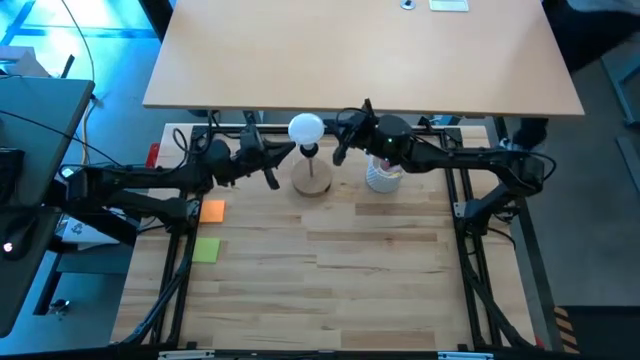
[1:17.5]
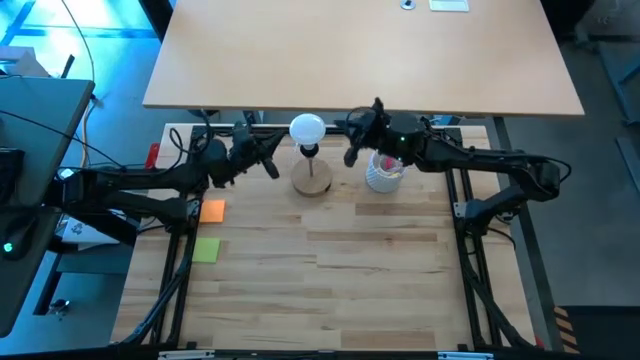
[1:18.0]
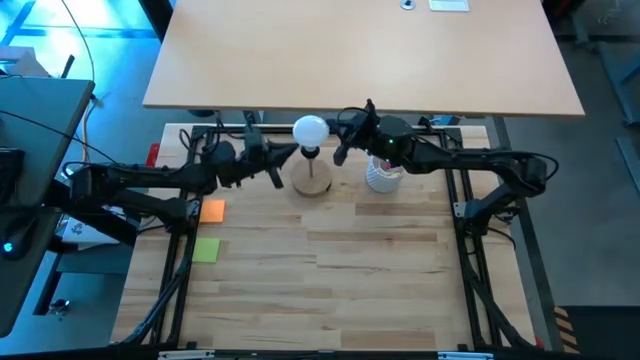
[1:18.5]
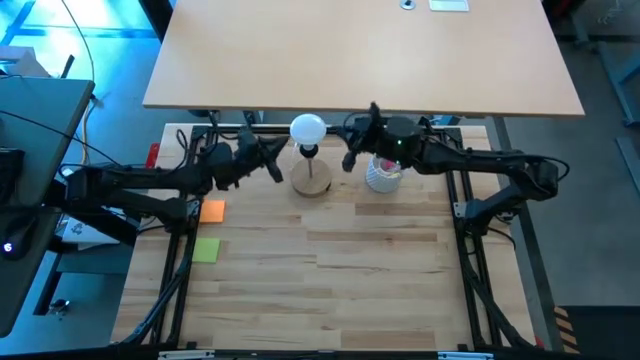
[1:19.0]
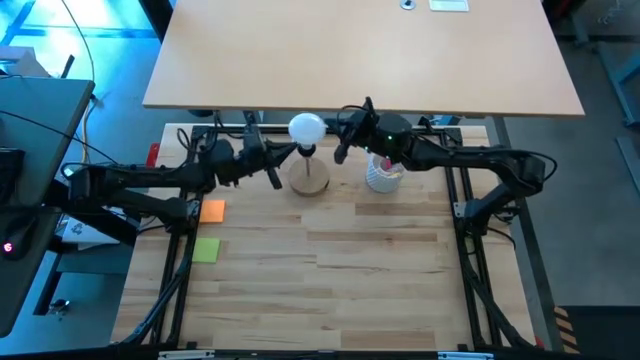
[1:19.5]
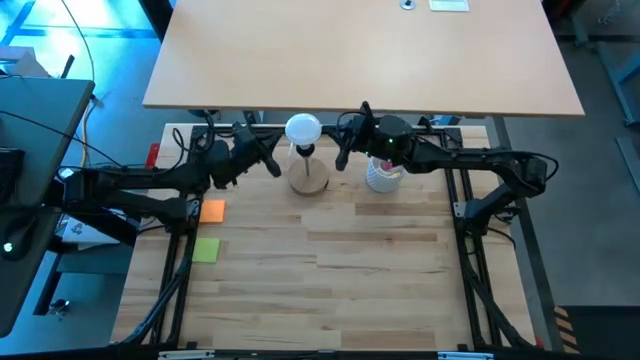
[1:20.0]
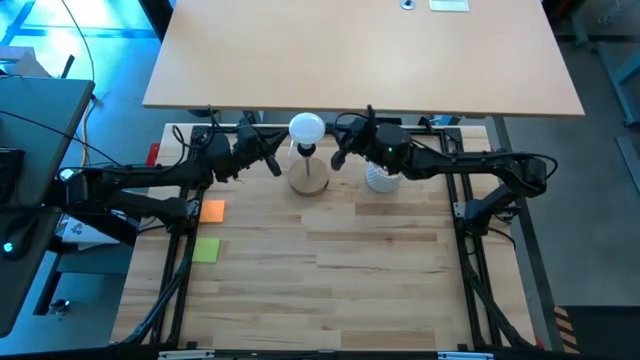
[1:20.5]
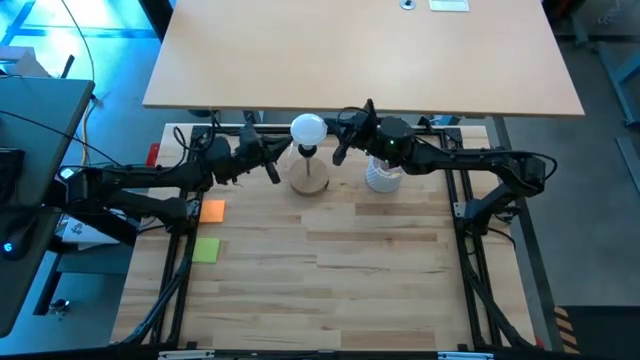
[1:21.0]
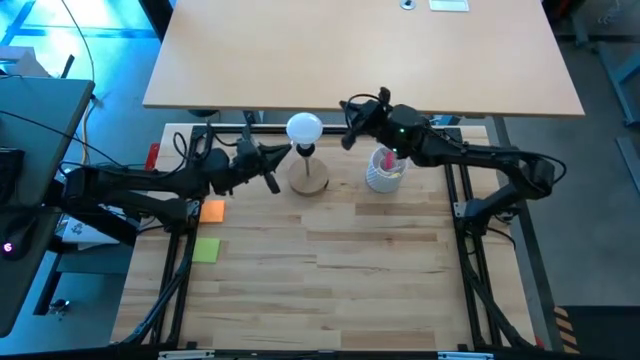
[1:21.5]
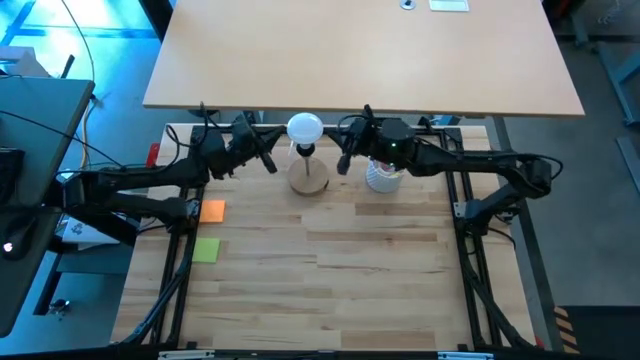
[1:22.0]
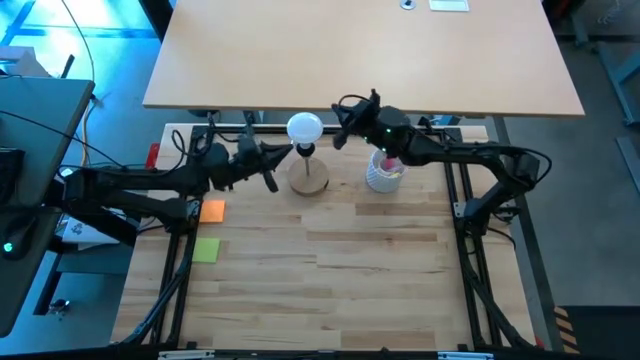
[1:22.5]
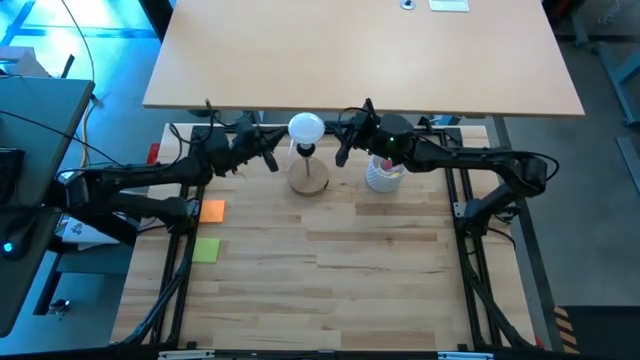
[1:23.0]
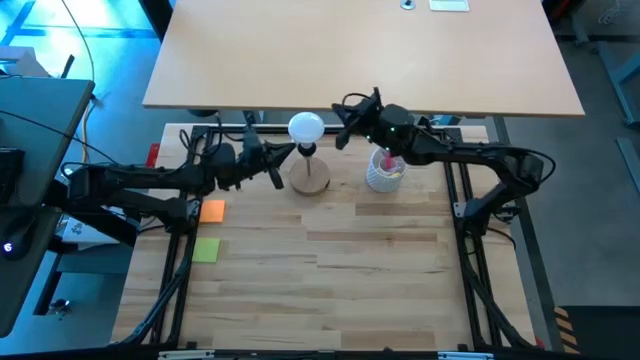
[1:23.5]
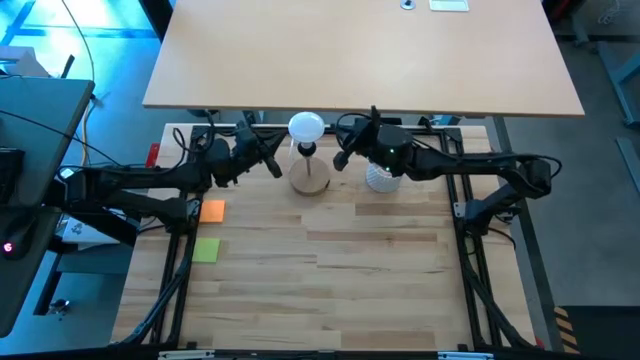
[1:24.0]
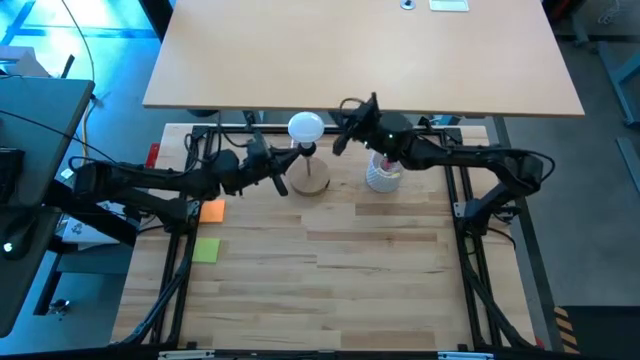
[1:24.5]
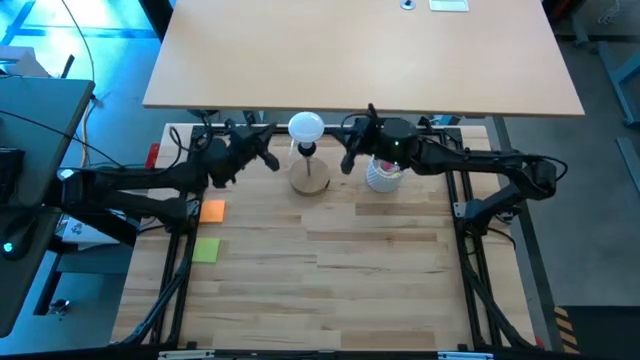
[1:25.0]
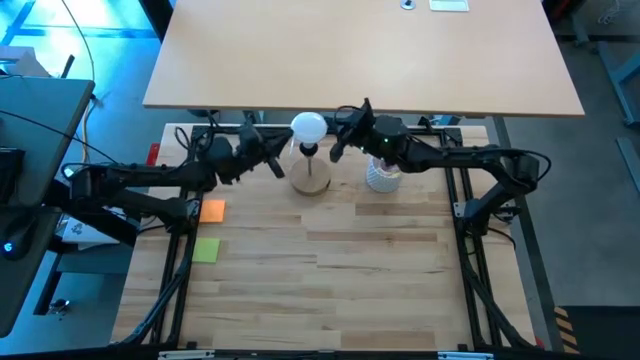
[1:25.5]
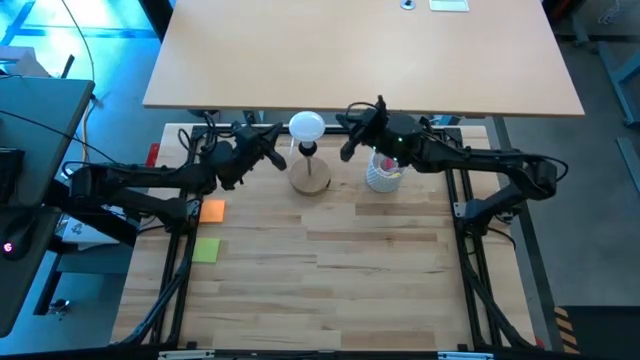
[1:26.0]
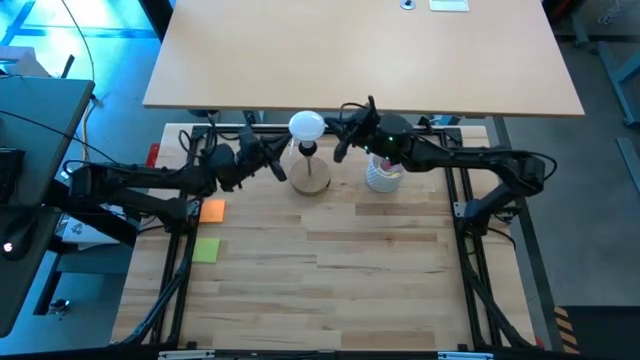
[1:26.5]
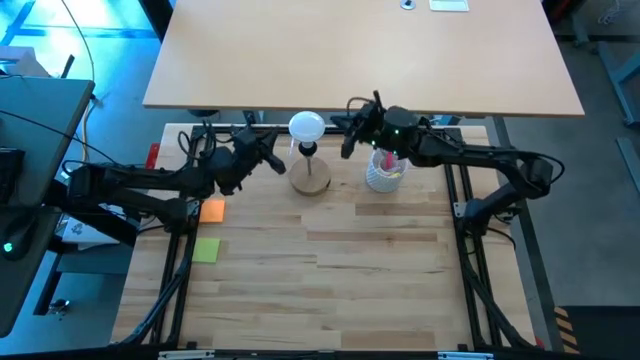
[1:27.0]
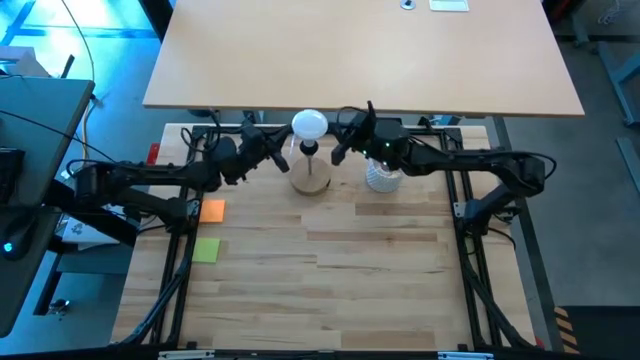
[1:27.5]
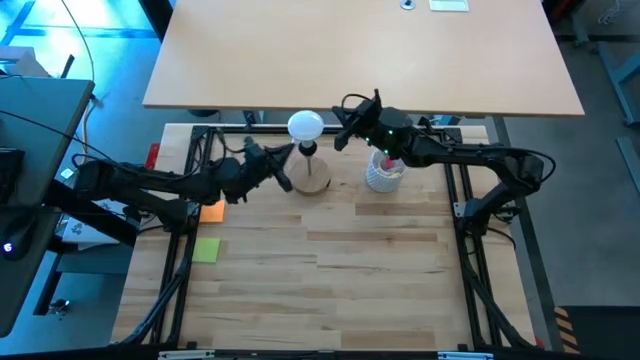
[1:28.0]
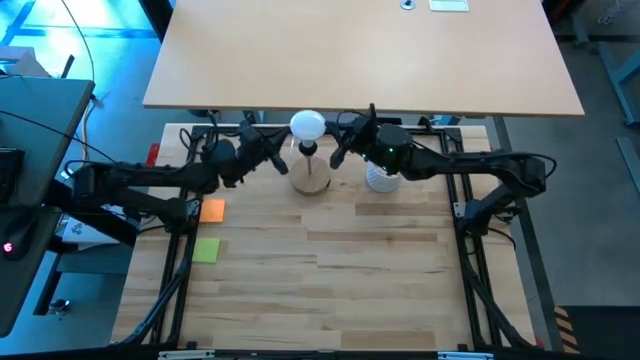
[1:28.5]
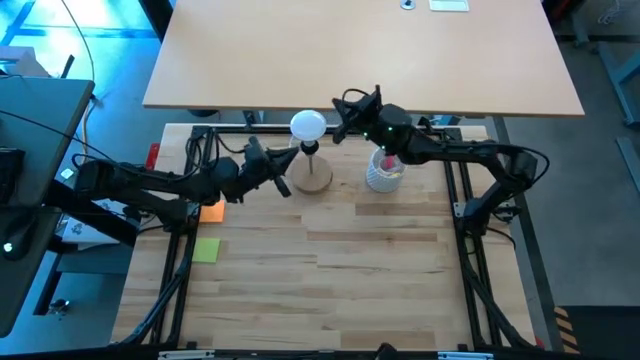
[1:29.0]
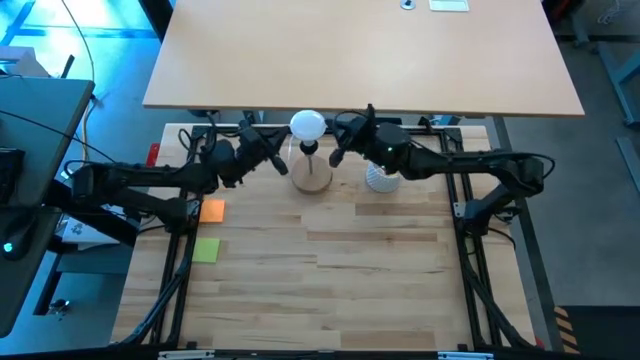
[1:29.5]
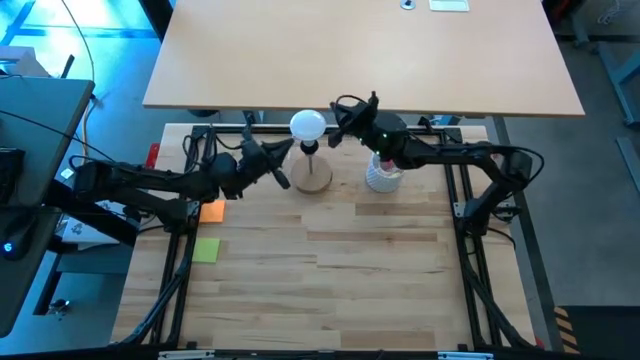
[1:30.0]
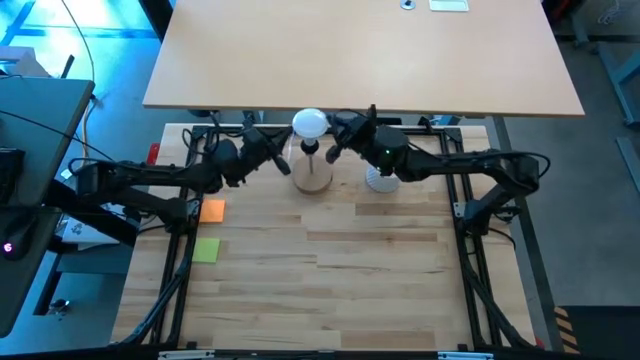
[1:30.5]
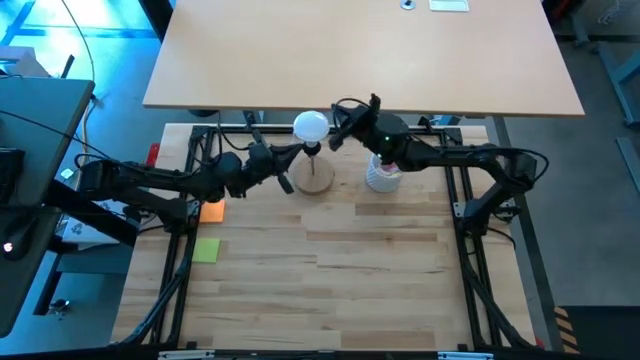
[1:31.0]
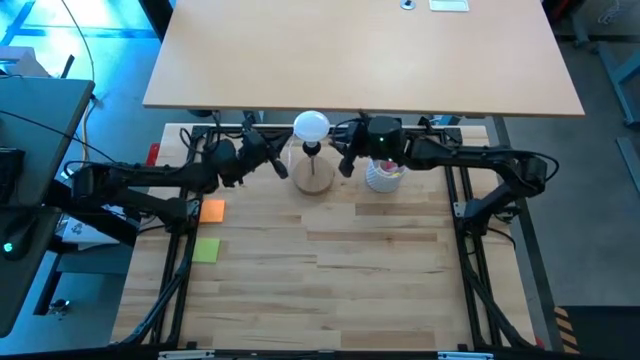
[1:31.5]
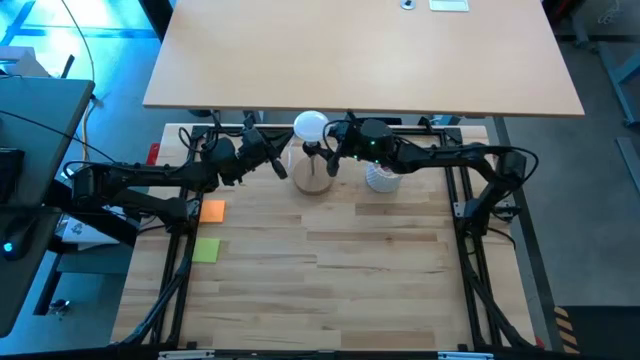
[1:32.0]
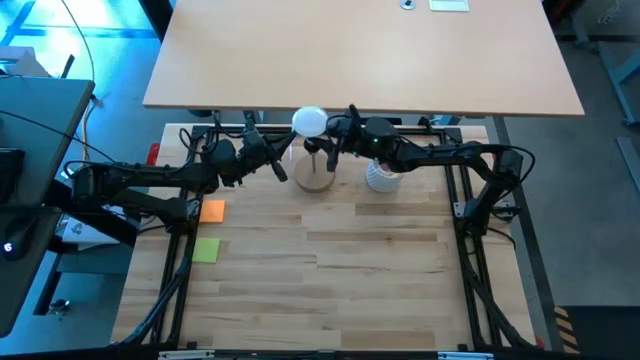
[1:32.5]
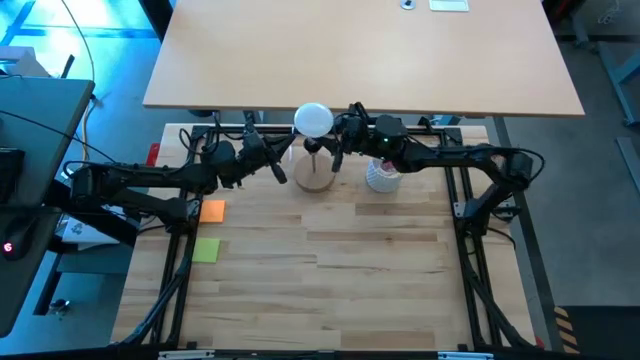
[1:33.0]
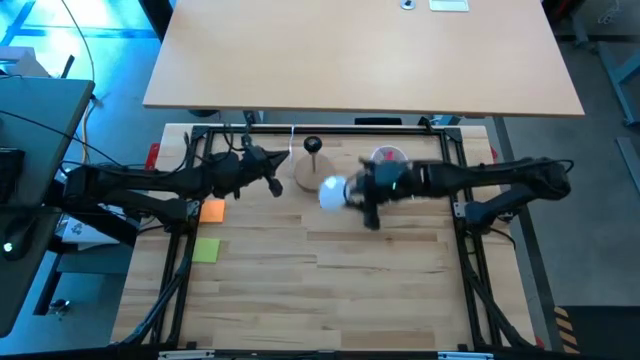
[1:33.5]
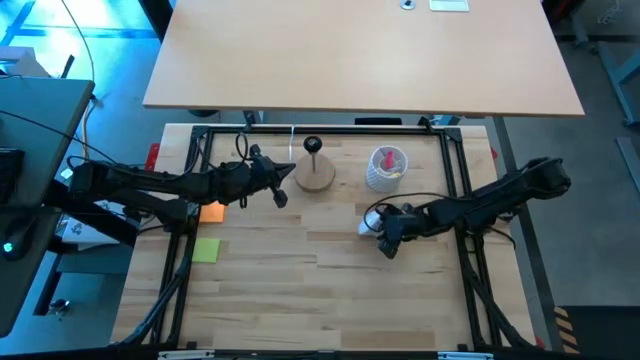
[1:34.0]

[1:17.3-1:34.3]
Task: Screw lightbulb
Remove the white lightbulb from the brown lamp
